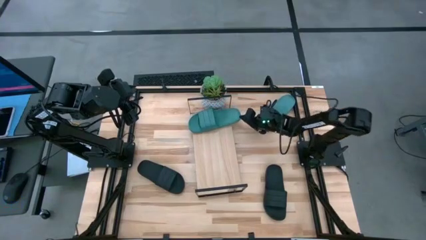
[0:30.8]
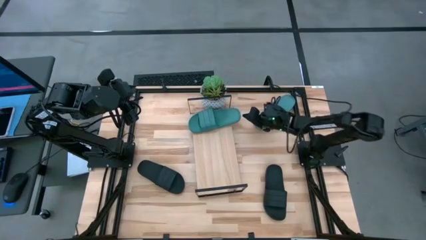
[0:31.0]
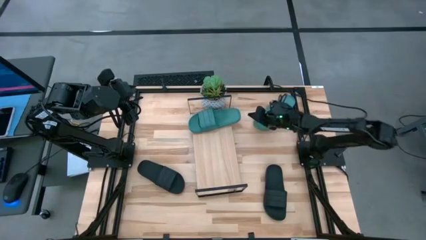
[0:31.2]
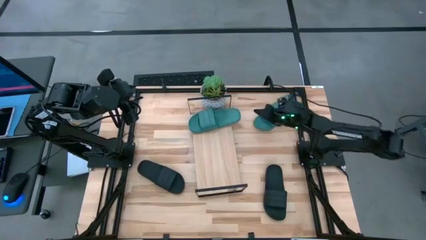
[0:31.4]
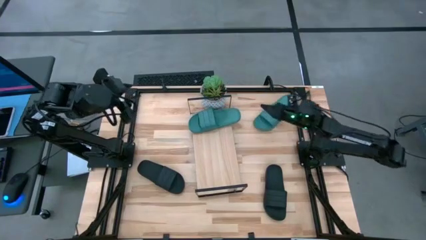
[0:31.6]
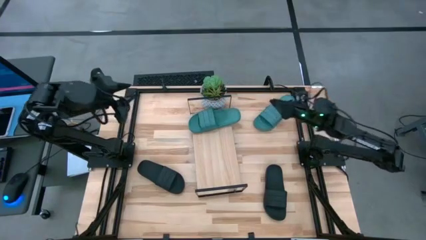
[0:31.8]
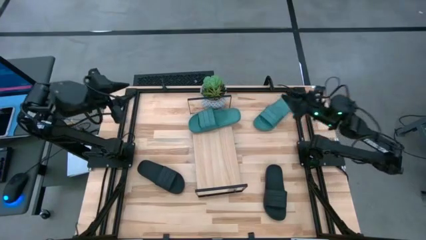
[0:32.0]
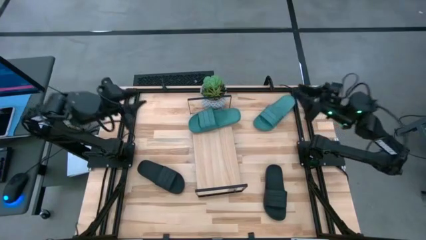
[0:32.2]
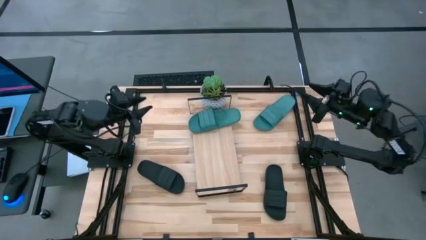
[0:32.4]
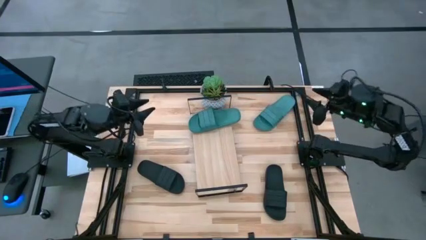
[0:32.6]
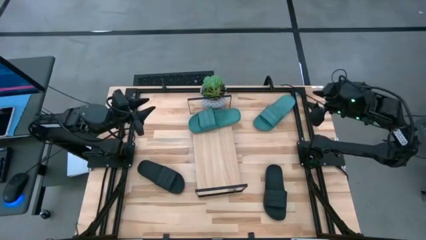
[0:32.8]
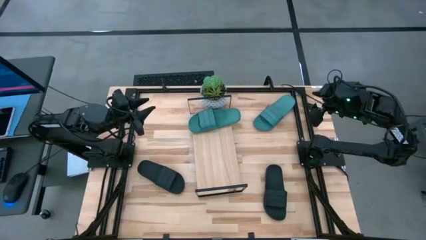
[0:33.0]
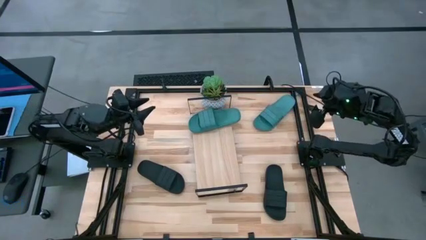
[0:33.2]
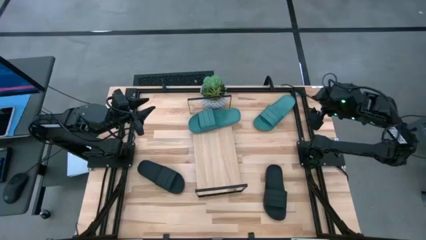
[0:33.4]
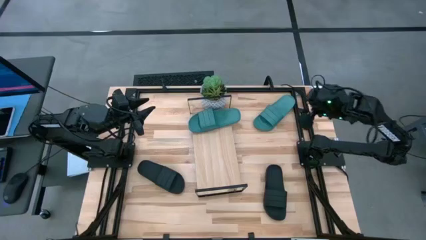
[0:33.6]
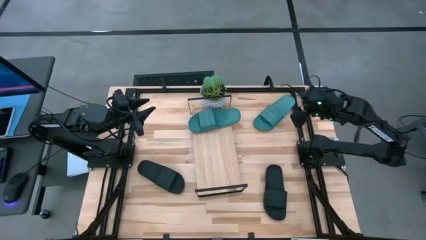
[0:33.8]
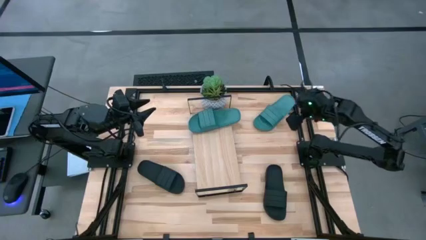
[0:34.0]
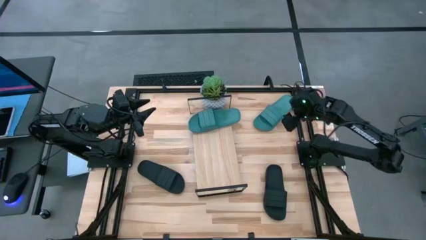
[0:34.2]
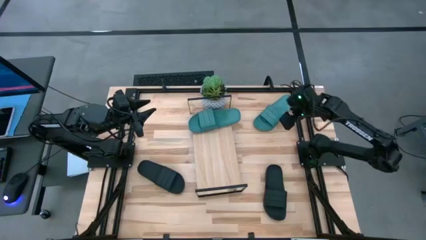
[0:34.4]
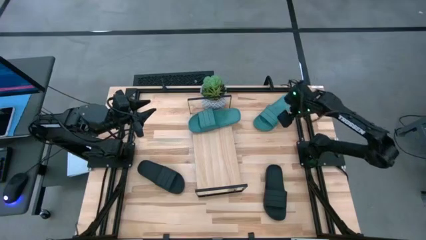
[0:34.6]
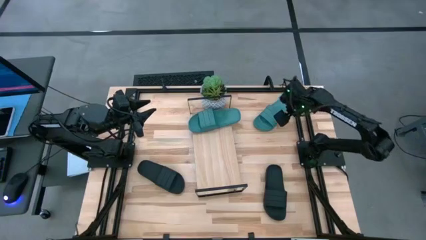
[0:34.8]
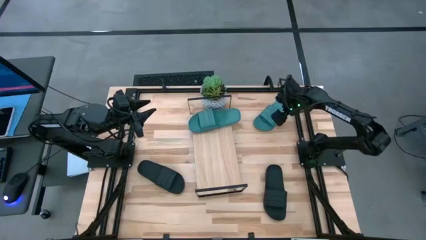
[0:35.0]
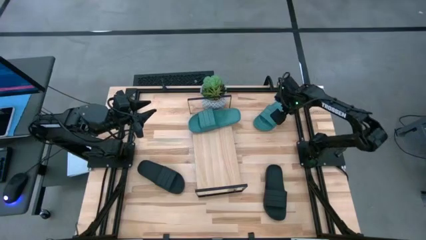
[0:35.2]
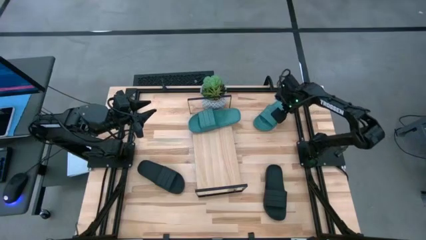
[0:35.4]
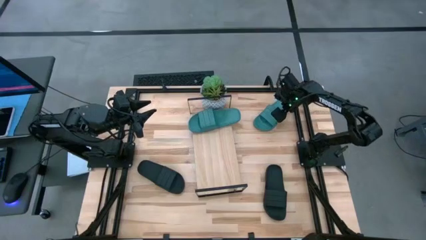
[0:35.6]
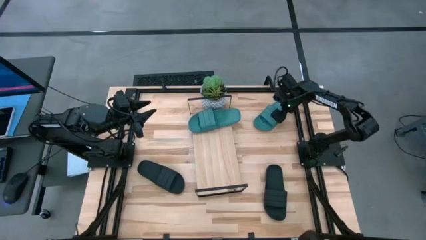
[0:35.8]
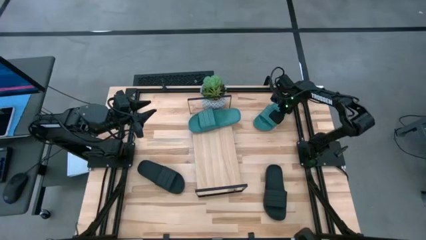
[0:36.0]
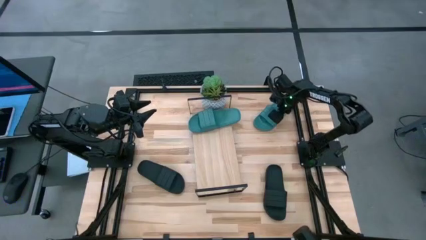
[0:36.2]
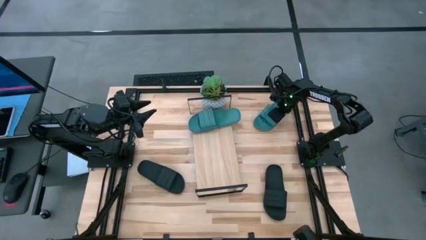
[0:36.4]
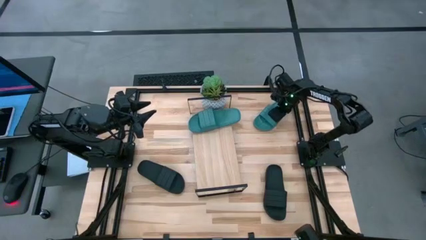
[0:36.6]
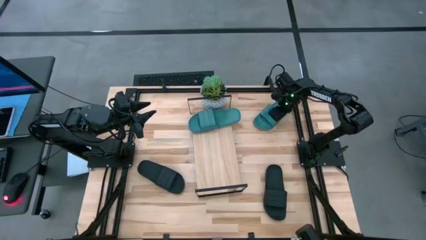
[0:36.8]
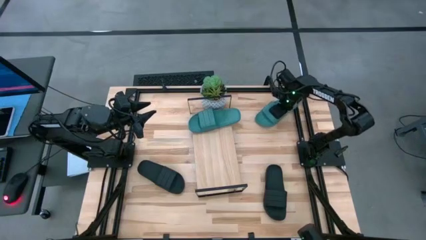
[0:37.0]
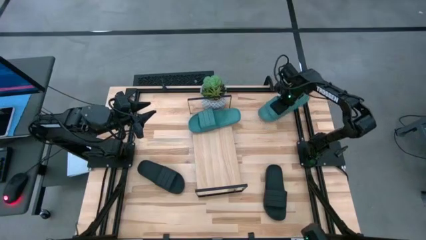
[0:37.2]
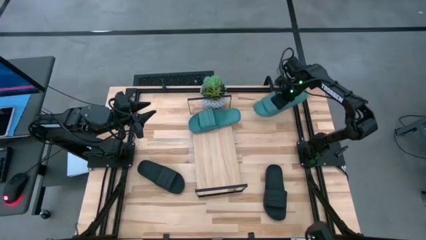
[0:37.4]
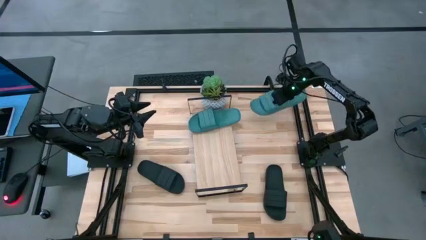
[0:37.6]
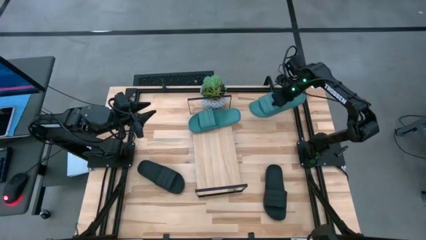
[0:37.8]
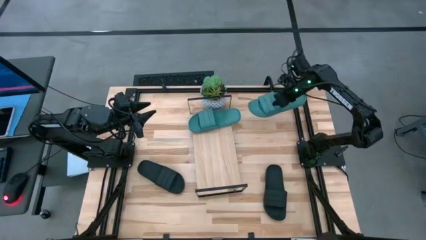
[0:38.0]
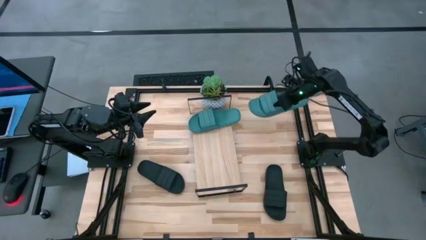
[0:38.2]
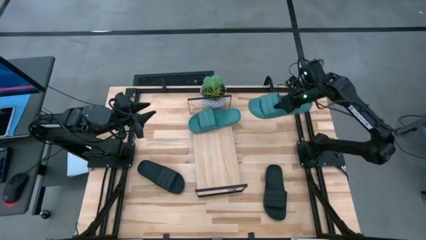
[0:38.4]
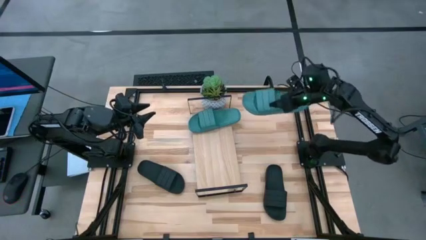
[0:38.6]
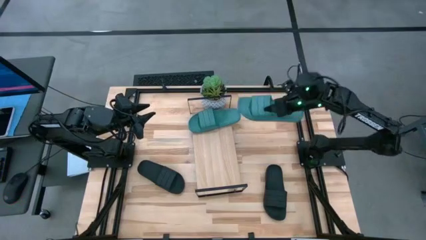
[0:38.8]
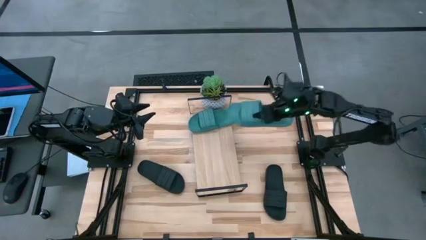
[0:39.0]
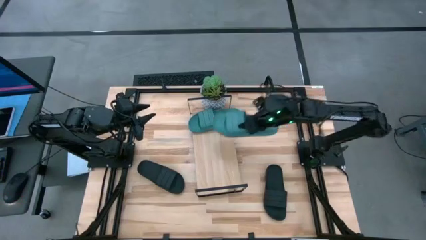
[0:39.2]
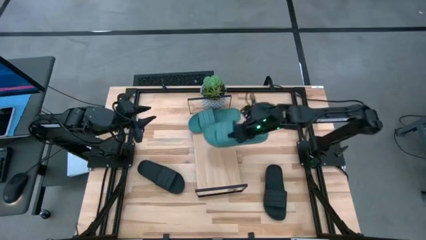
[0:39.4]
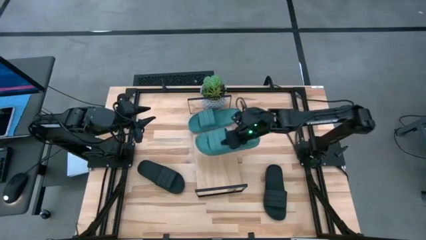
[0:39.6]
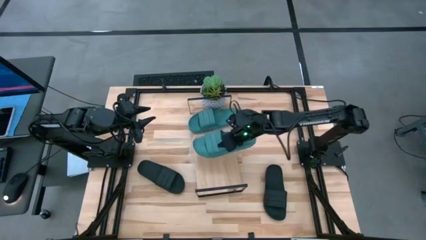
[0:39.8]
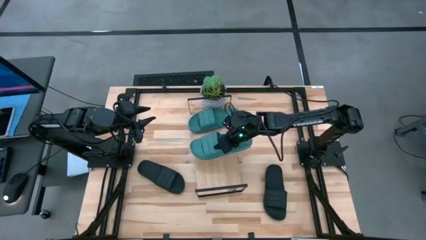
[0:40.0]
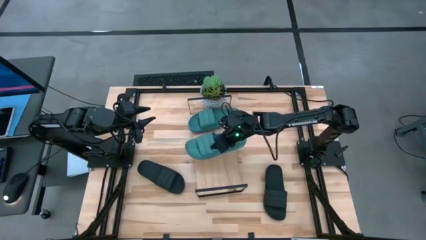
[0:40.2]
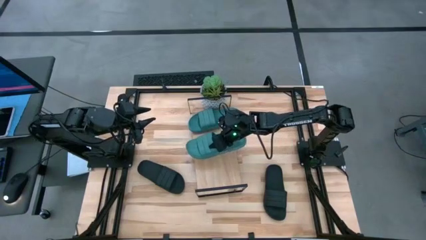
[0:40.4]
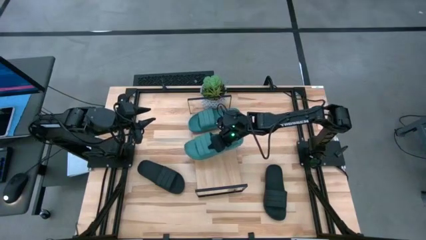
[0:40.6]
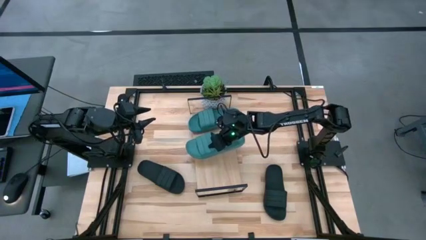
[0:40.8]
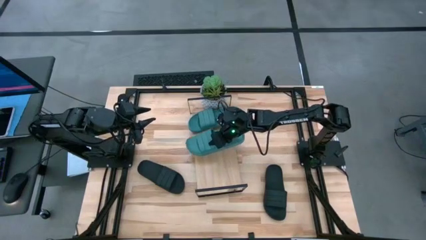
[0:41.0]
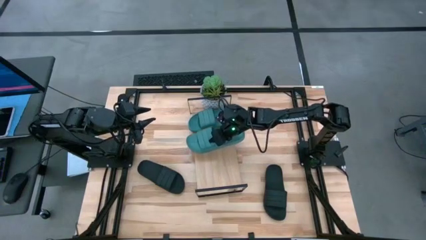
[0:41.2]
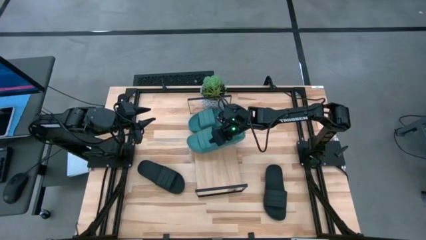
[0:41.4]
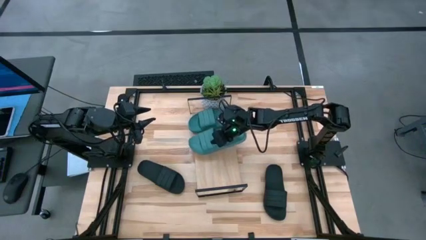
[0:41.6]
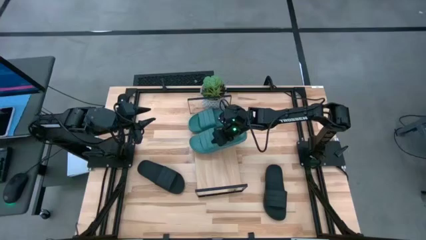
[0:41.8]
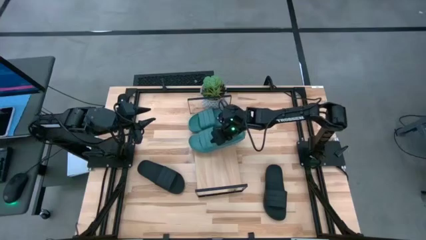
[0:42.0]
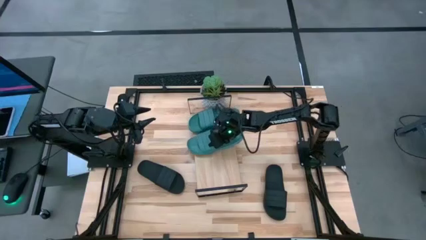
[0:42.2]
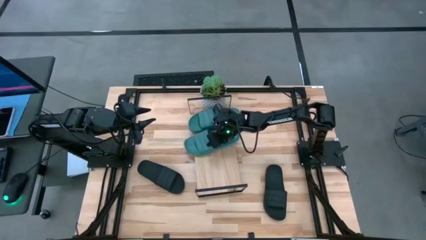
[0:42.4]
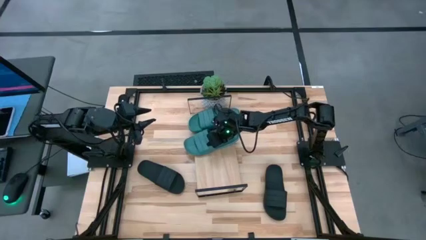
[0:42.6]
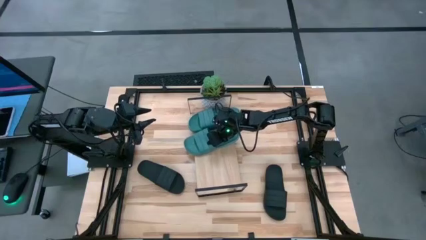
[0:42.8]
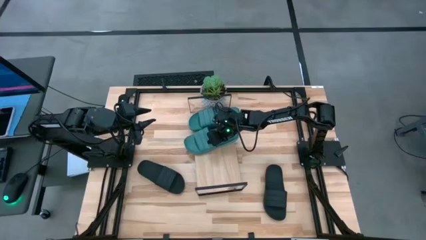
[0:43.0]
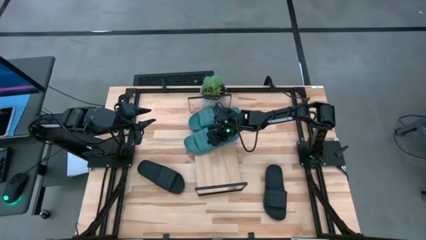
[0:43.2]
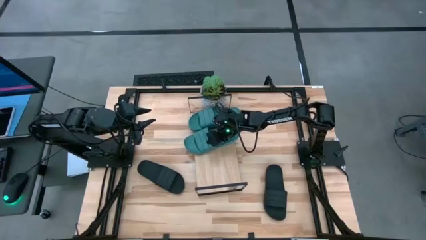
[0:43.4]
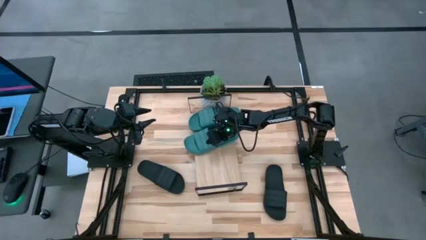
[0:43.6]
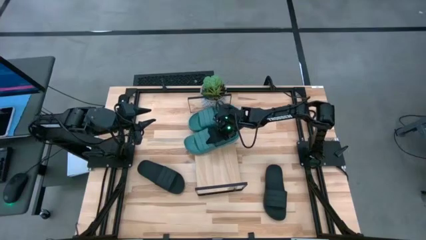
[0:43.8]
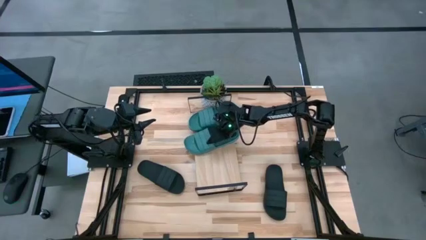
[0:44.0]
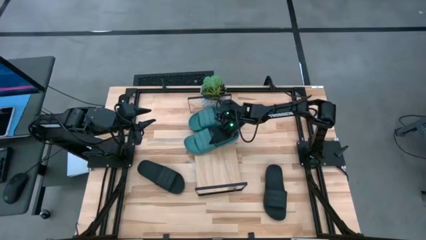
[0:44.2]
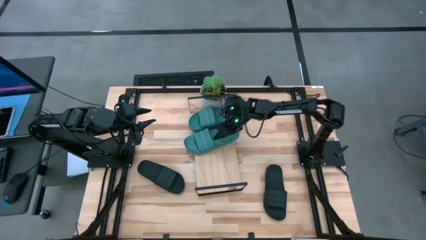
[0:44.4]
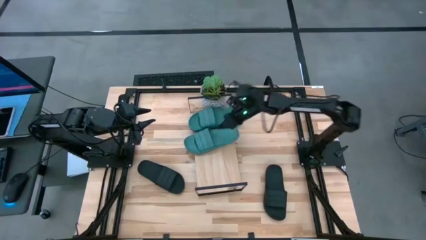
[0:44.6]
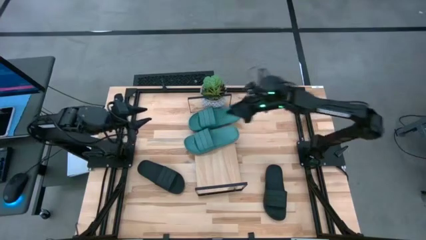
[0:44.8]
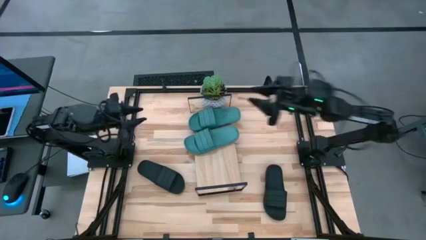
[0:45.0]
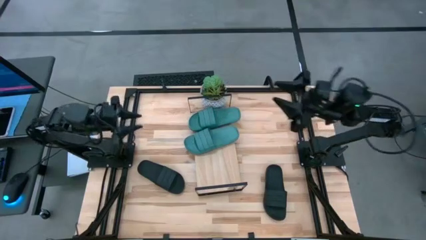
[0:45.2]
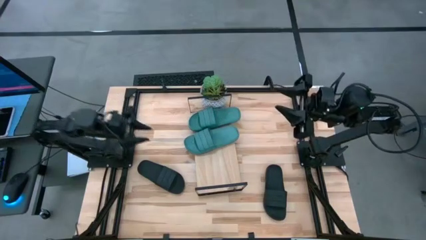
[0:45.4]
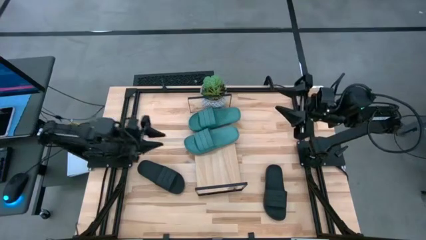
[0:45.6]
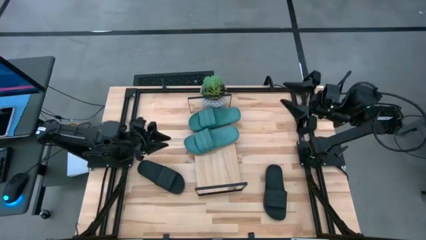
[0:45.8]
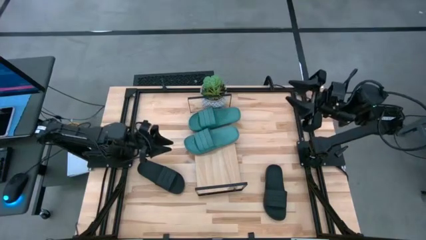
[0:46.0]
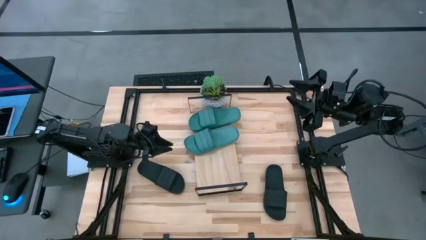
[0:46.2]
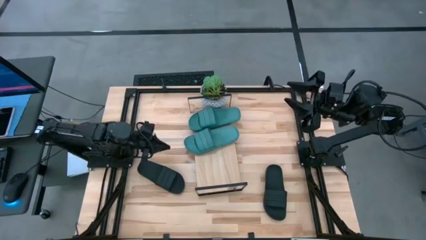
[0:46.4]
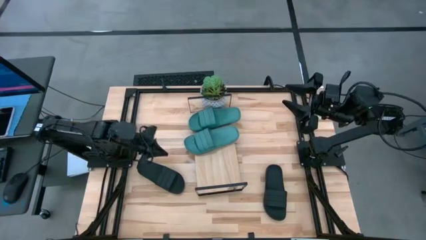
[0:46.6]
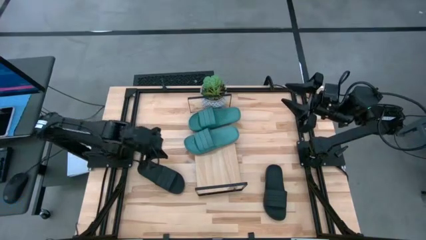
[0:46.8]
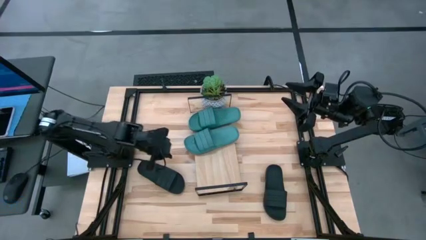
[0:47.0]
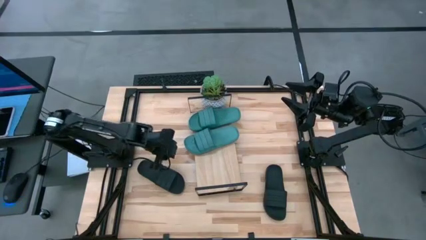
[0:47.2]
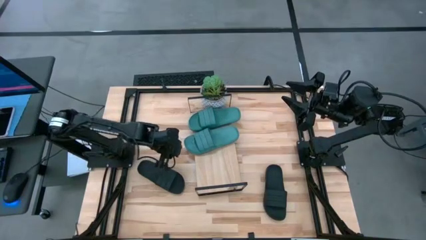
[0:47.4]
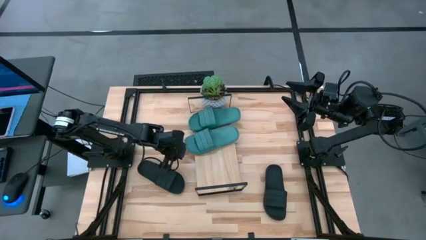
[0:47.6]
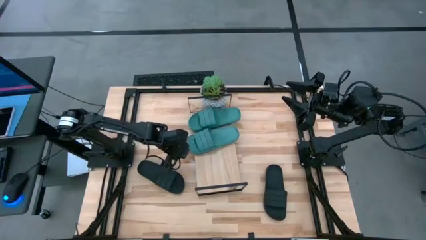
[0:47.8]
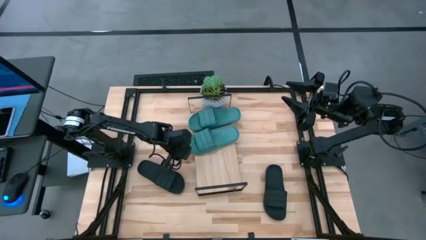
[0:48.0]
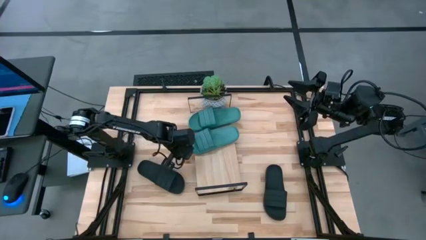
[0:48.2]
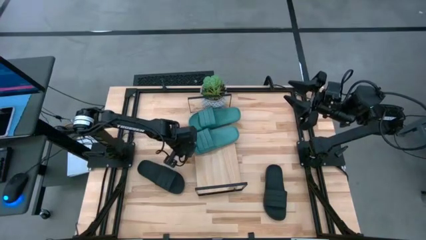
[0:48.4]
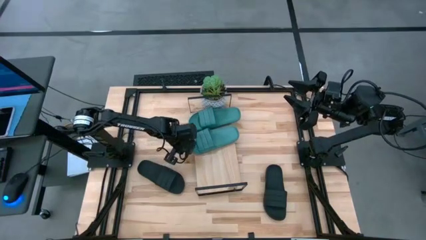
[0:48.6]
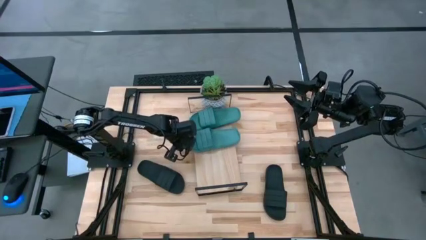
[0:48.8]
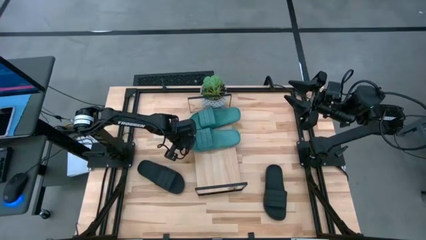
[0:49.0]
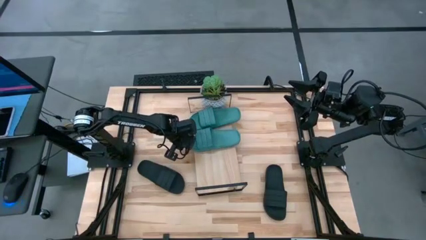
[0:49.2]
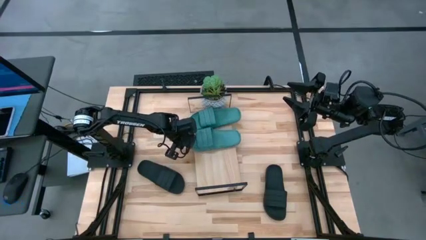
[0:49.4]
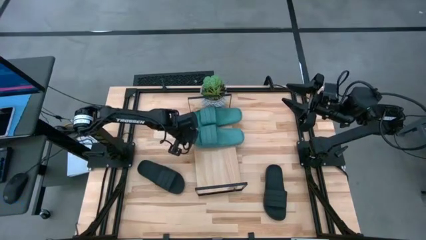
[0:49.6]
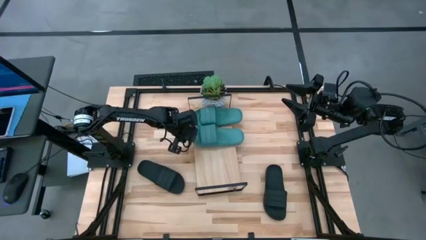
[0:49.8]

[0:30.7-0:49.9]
Task: Pick and place slides into the shelf
Put the blue slides on the shelf
